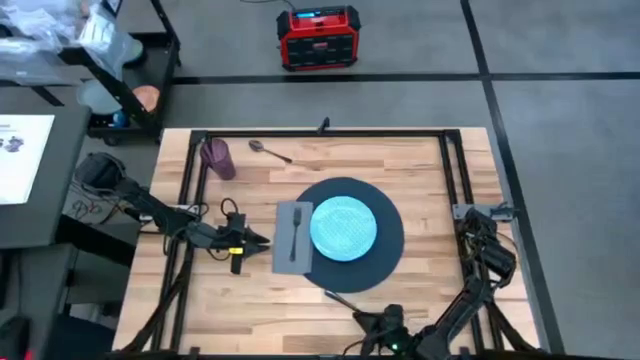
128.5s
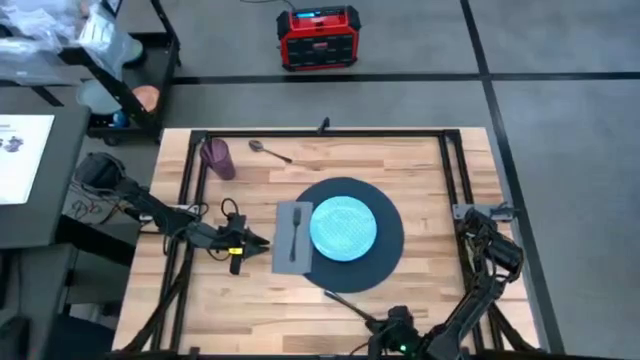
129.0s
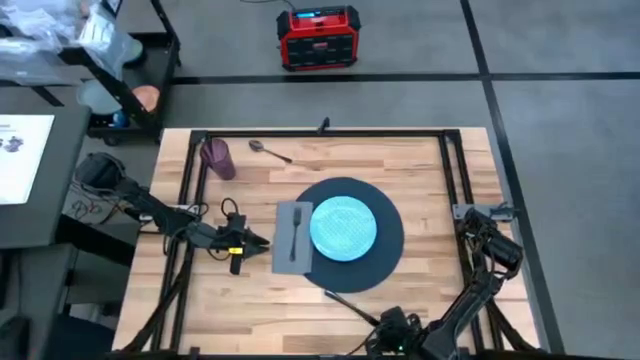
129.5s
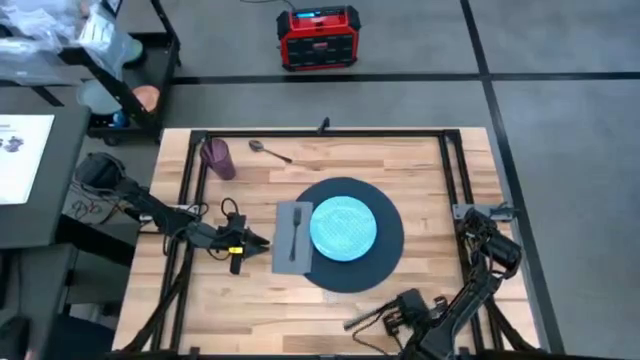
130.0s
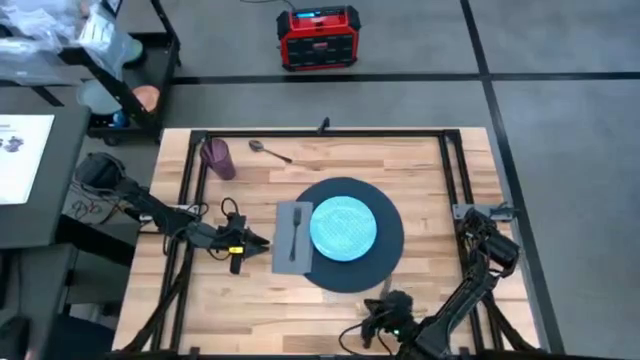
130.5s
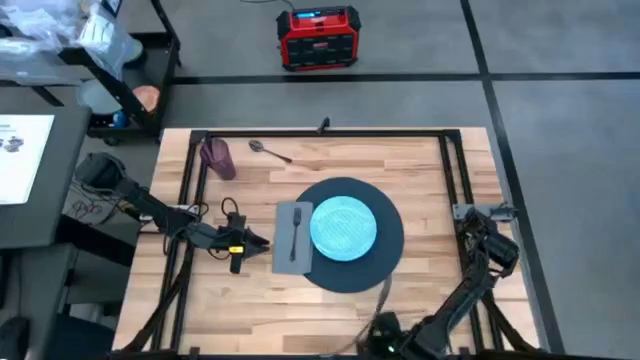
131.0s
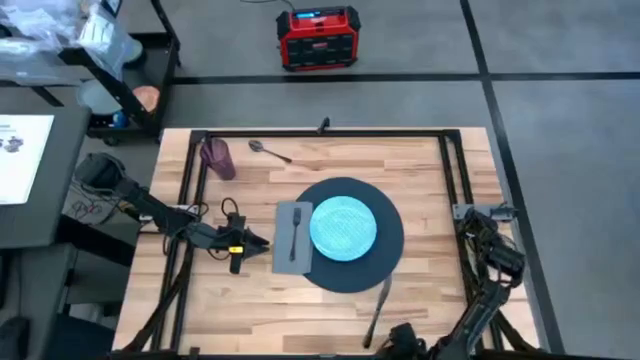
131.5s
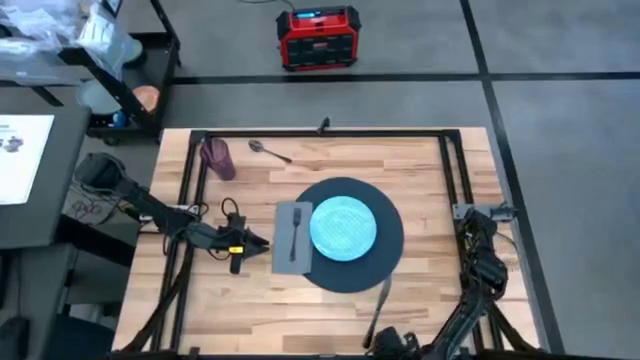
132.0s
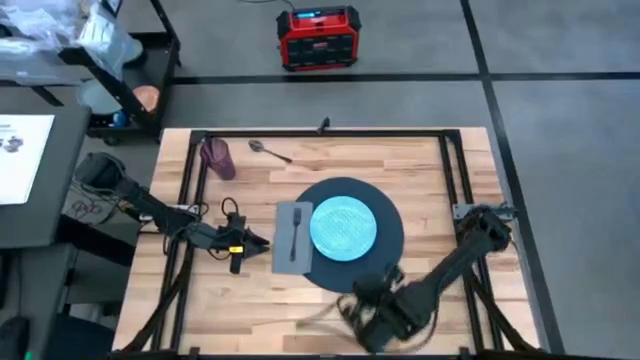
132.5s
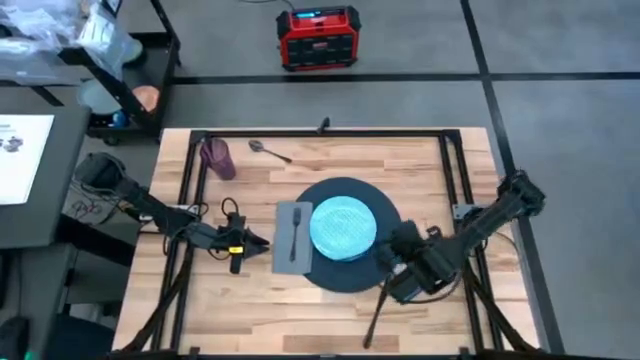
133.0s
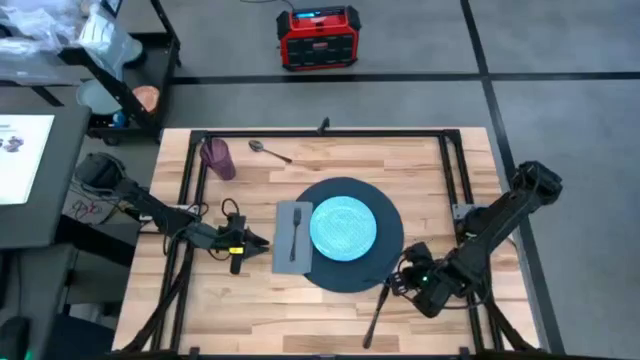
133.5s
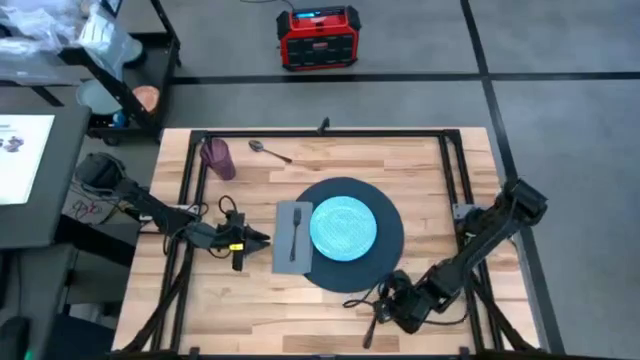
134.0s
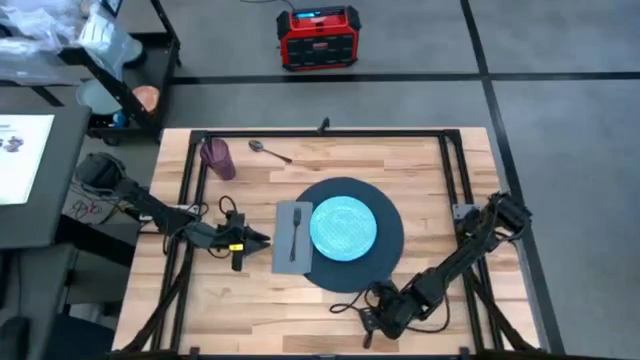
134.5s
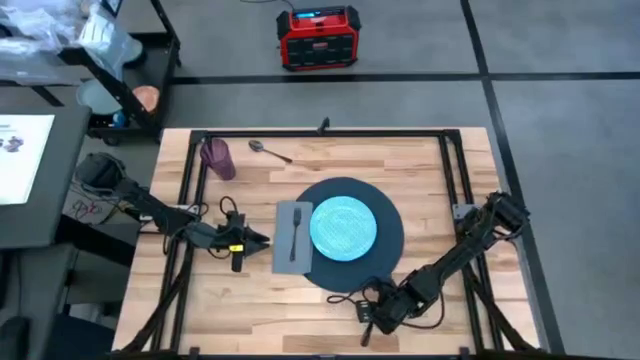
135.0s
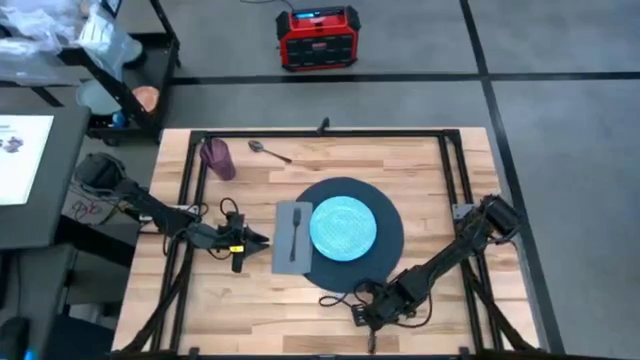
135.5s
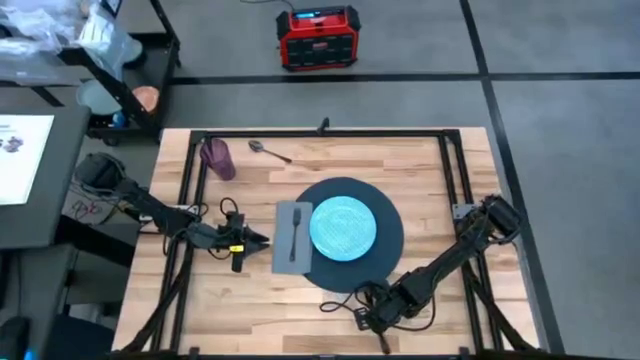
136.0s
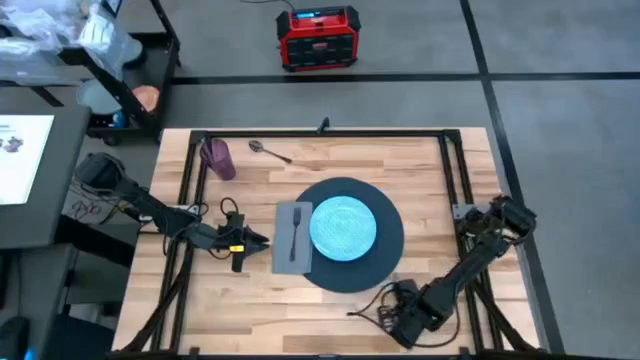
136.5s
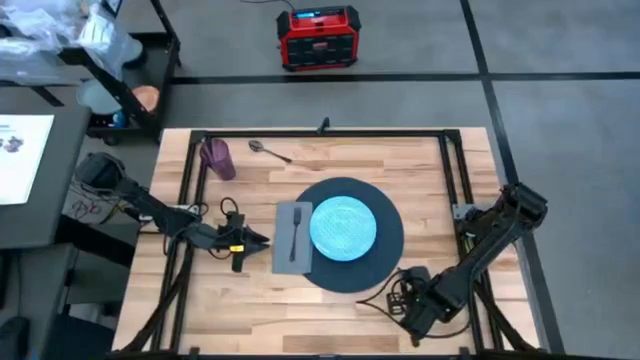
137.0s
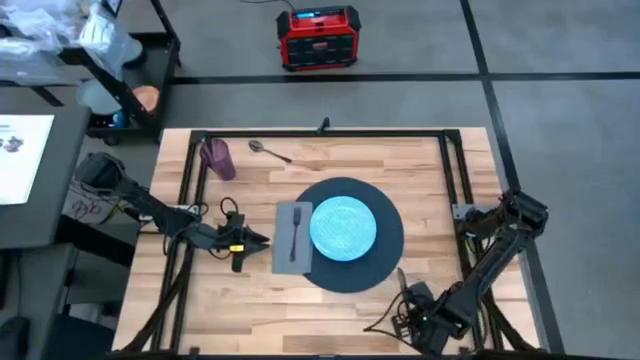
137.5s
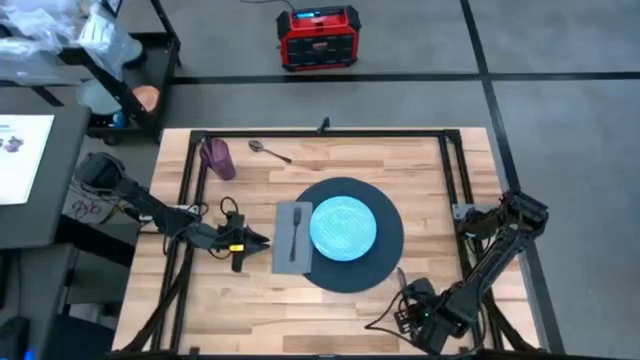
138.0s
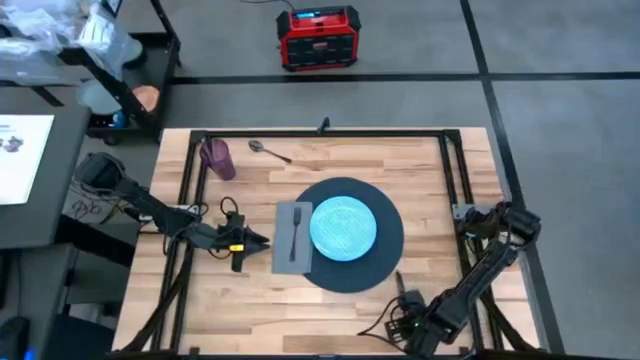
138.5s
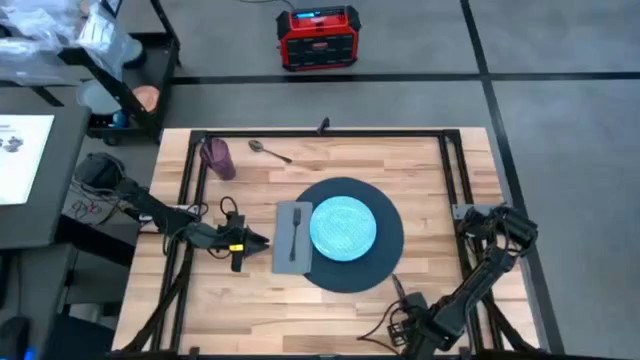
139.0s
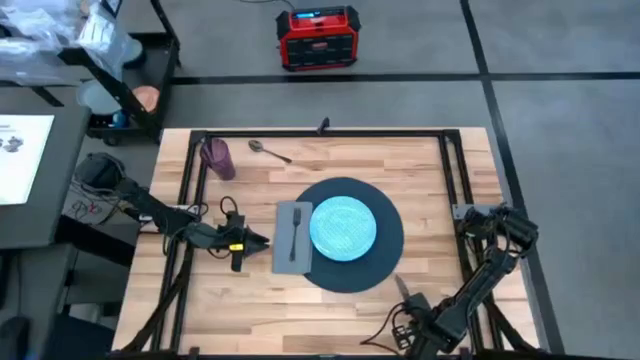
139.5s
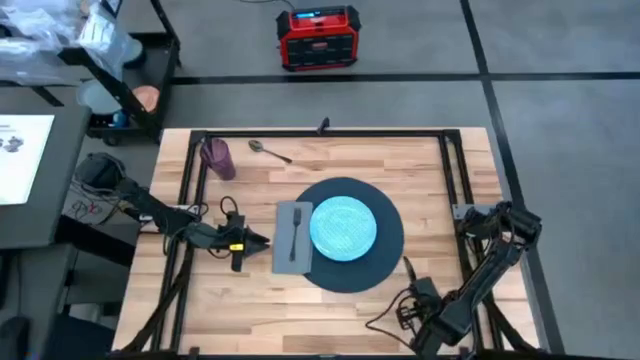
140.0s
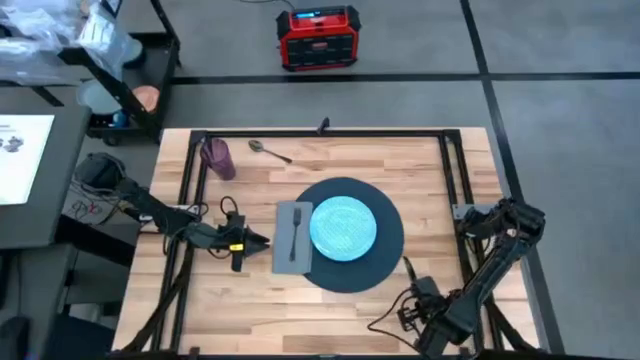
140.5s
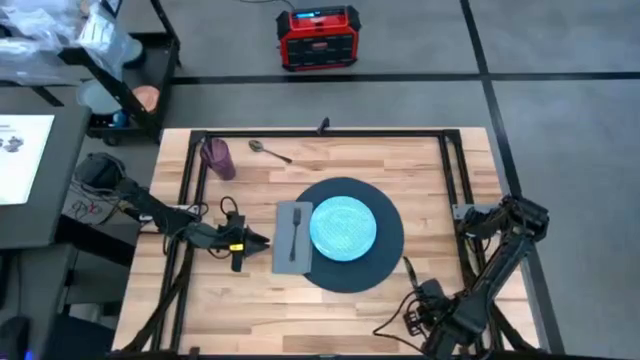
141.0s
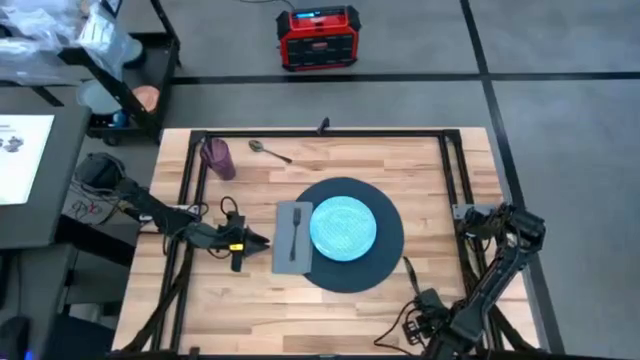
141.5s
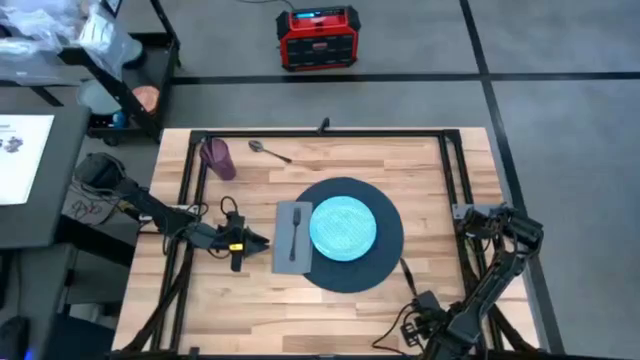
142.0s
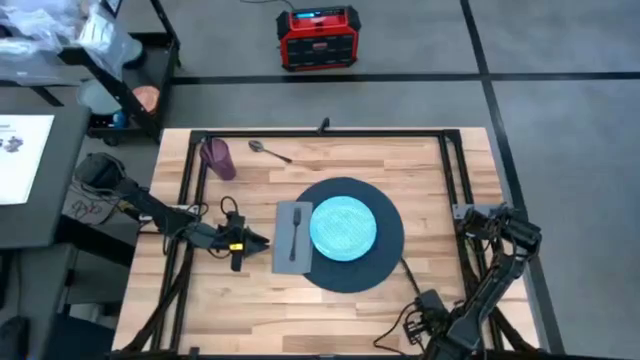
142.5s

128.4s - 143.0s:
Task: Set table place
Put the black knife on the dark blue table mat

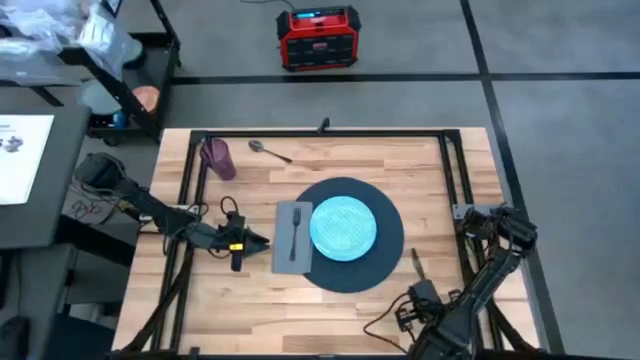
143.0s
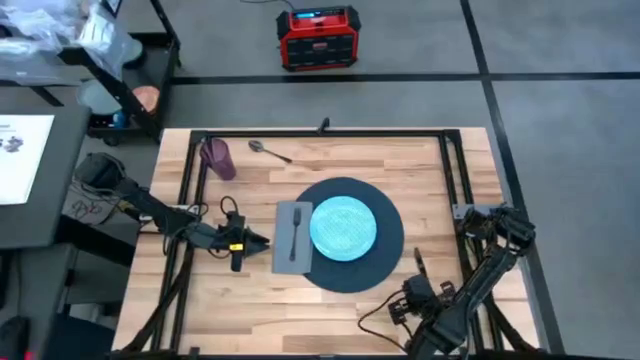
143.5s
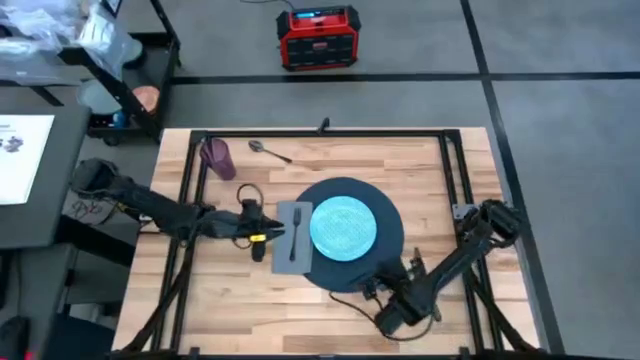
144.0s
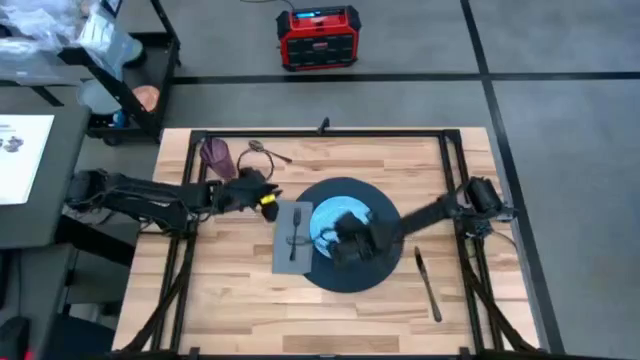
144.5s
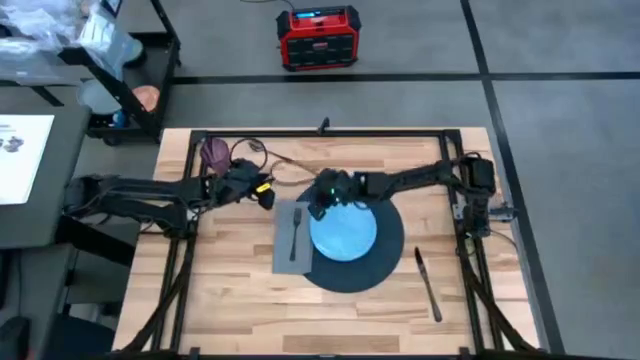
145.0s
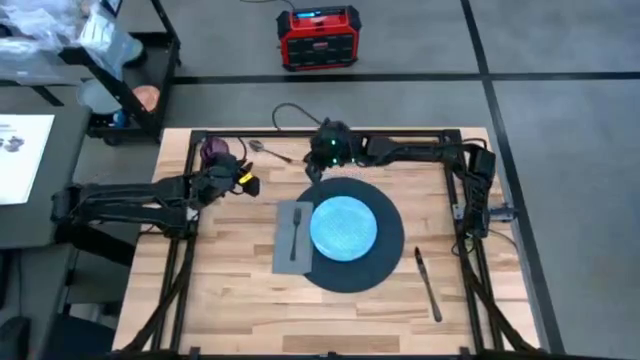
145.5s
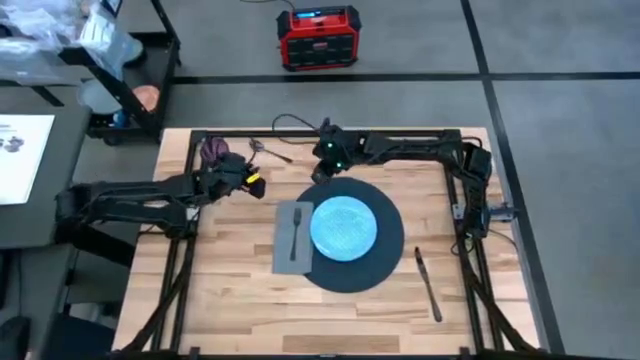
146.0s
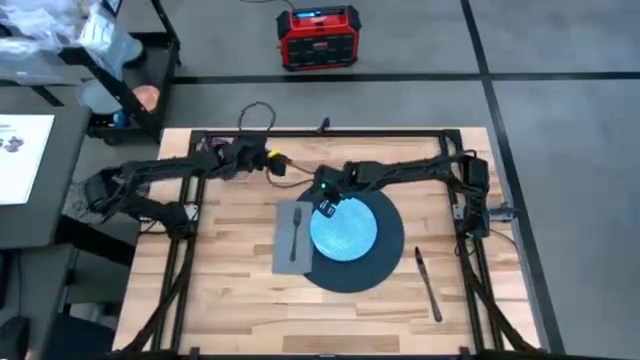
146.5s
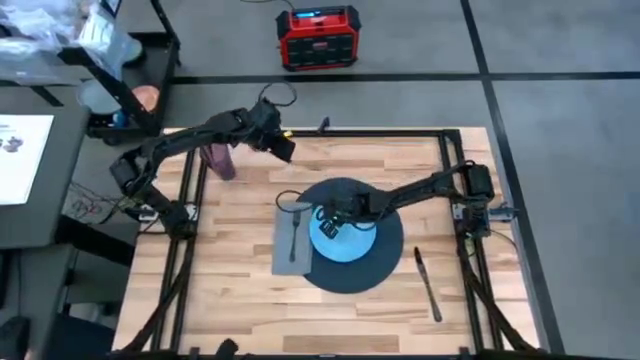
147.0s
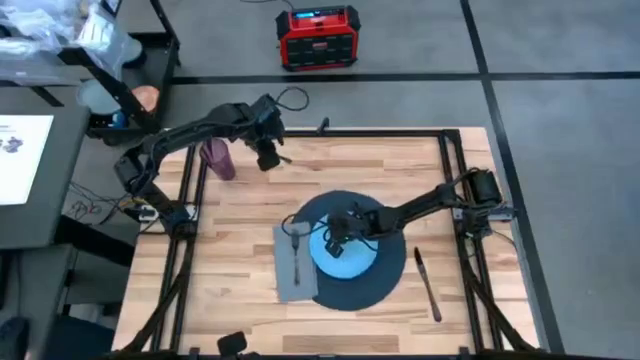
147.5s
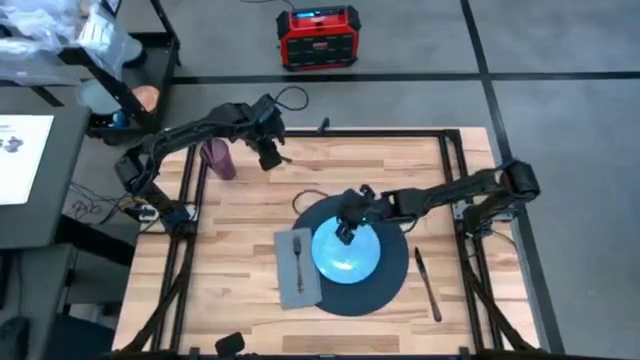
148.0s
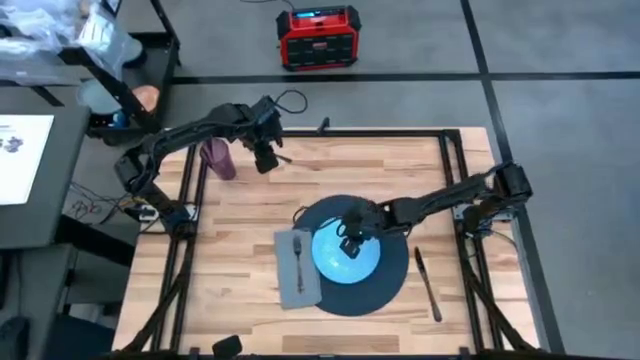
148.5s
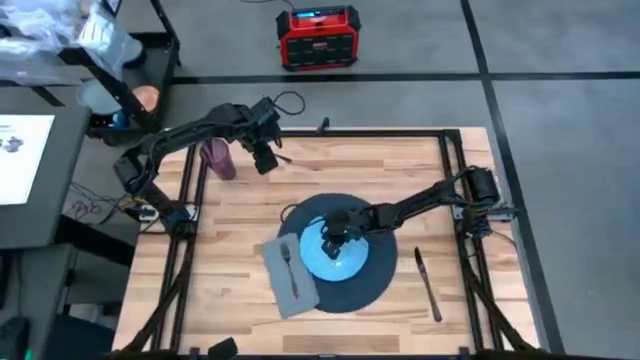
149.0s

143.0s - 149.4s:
Adjust the blue patterned plate on the dark blue table mat
